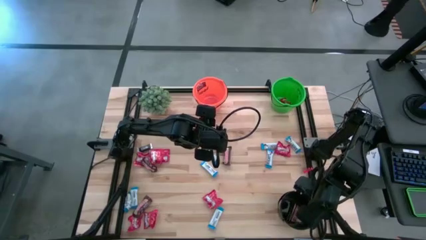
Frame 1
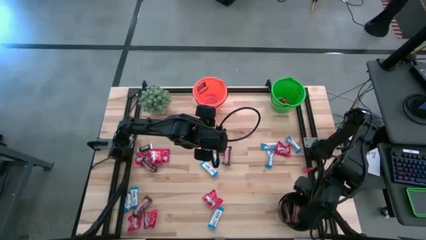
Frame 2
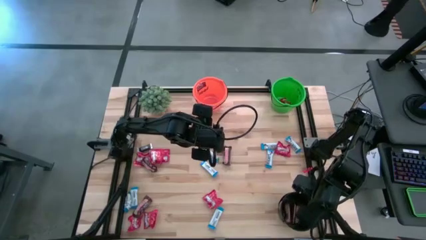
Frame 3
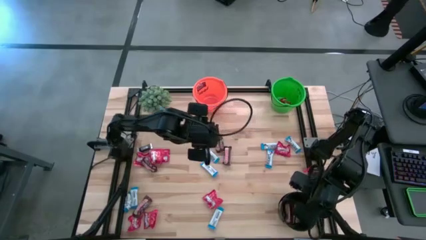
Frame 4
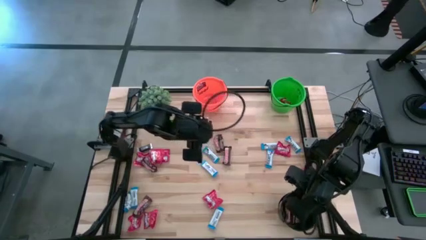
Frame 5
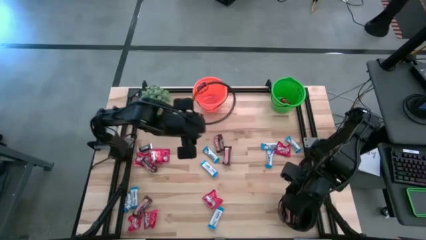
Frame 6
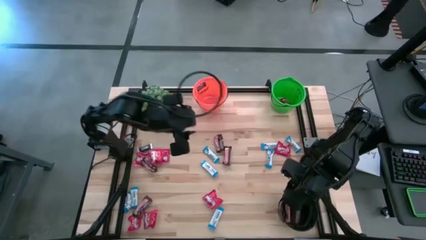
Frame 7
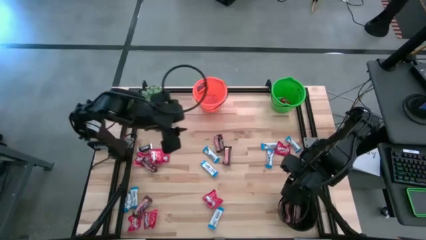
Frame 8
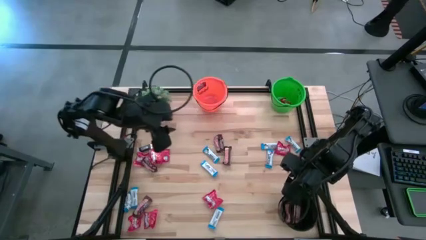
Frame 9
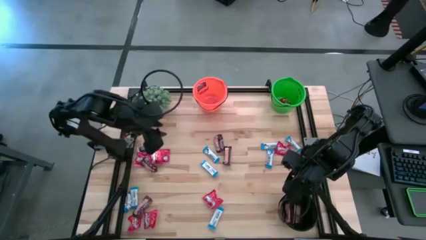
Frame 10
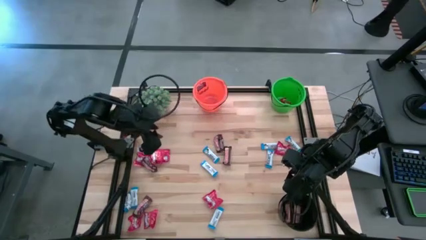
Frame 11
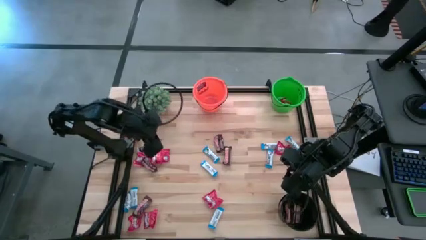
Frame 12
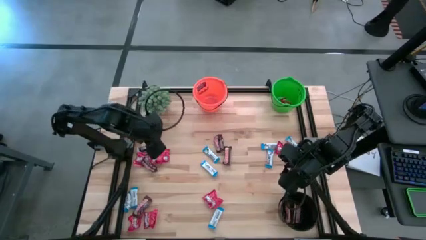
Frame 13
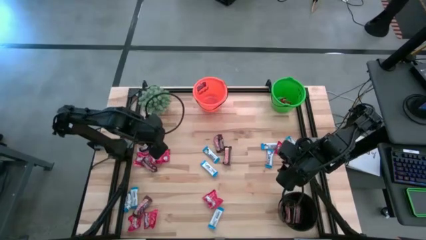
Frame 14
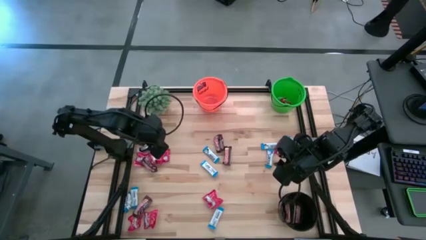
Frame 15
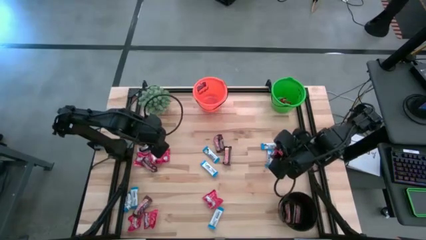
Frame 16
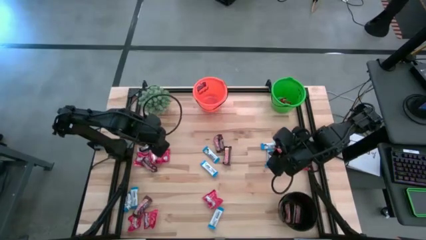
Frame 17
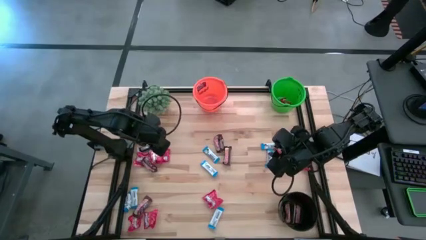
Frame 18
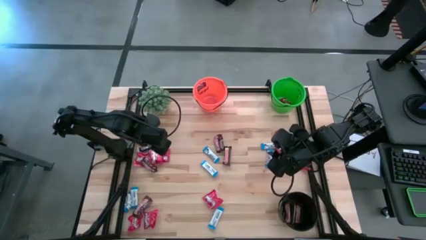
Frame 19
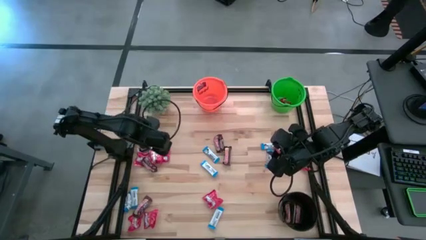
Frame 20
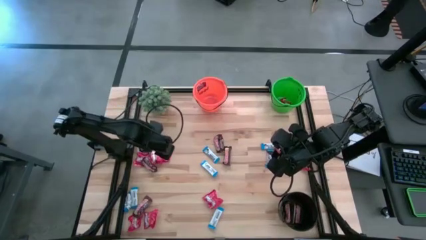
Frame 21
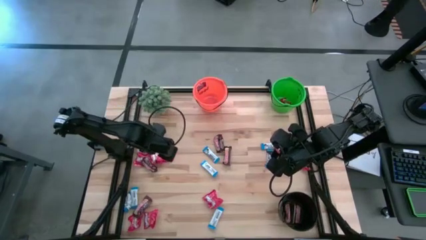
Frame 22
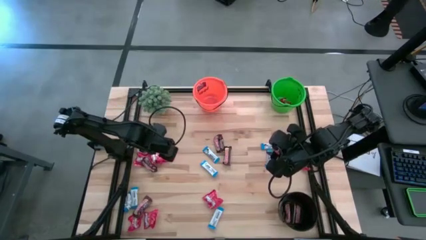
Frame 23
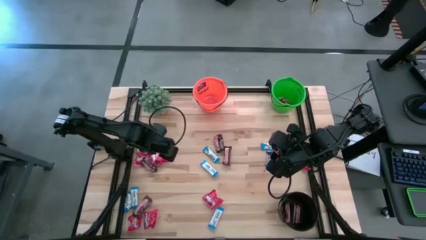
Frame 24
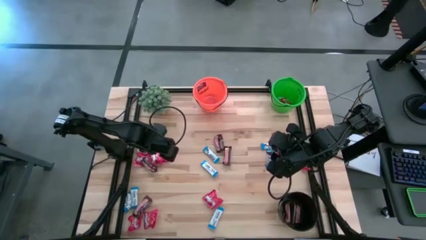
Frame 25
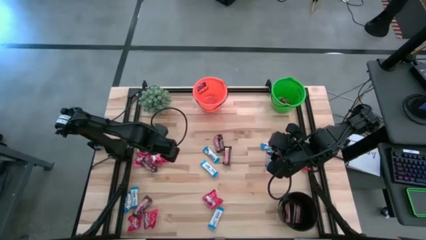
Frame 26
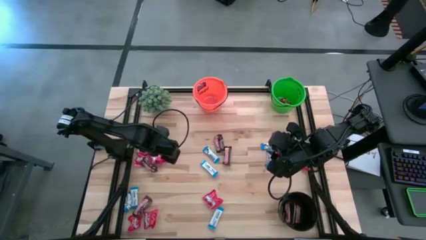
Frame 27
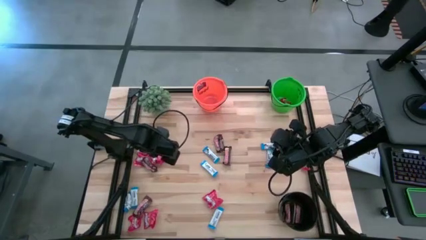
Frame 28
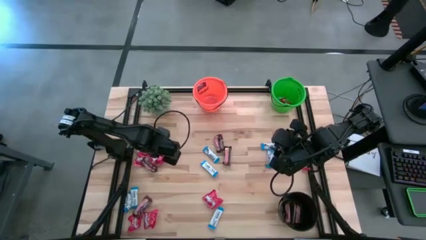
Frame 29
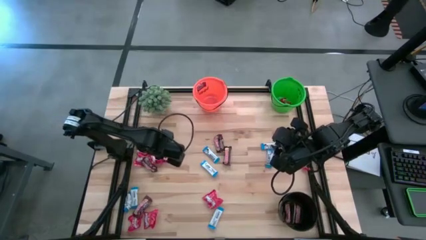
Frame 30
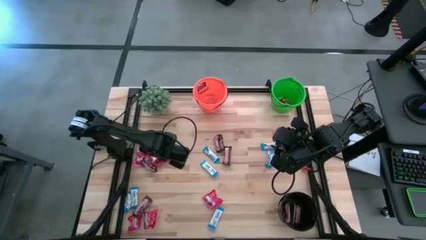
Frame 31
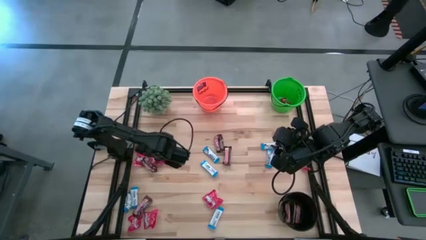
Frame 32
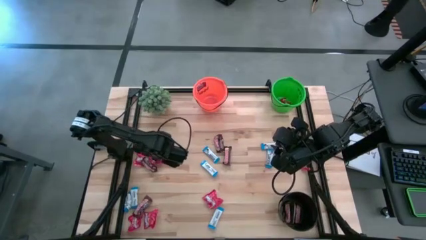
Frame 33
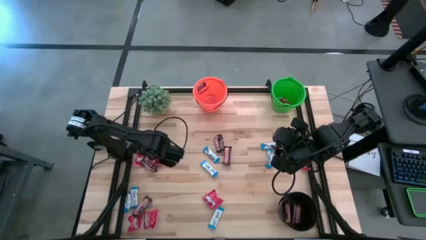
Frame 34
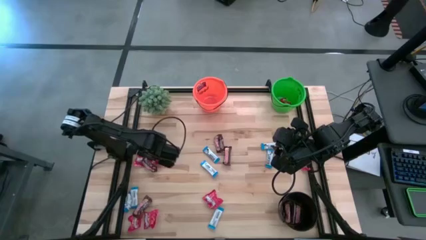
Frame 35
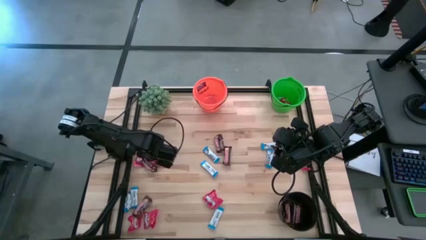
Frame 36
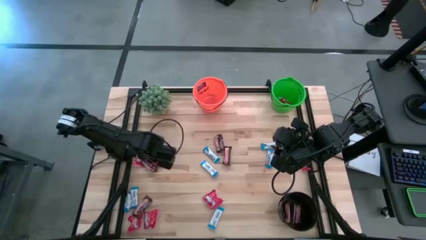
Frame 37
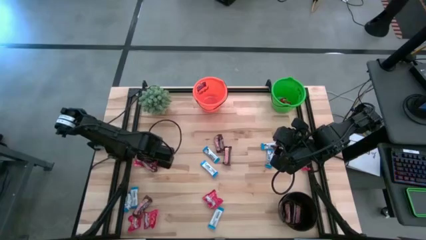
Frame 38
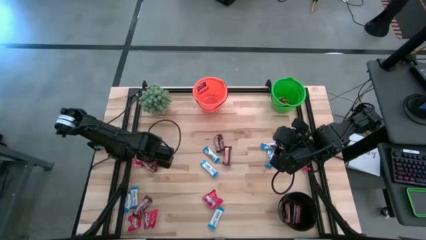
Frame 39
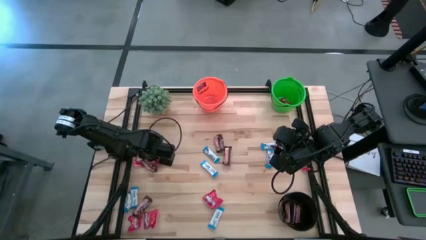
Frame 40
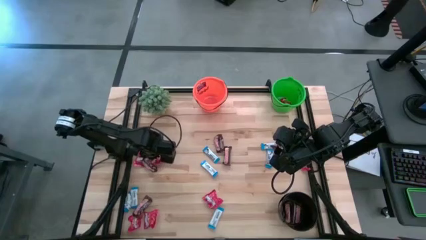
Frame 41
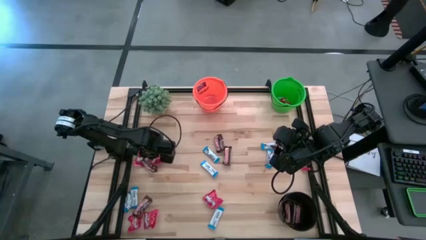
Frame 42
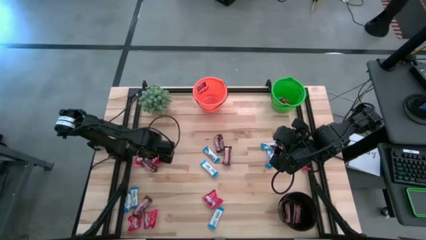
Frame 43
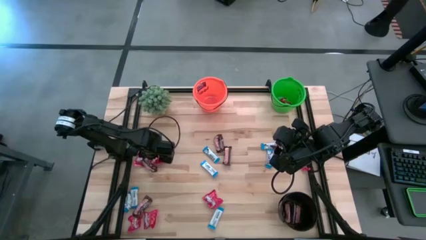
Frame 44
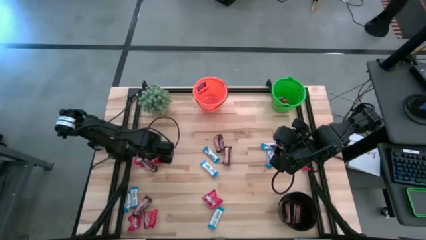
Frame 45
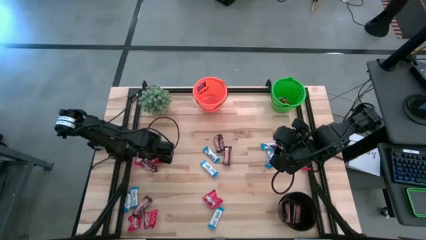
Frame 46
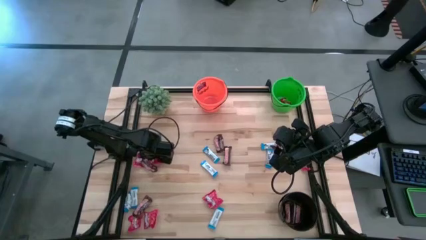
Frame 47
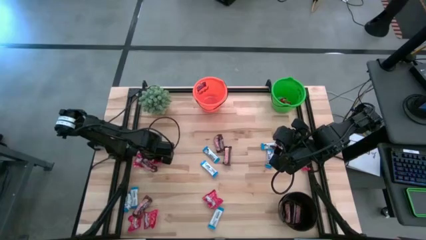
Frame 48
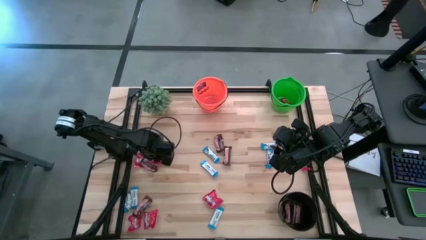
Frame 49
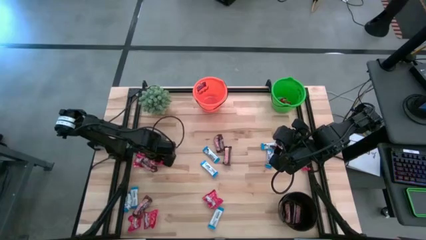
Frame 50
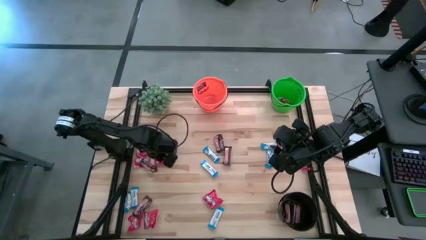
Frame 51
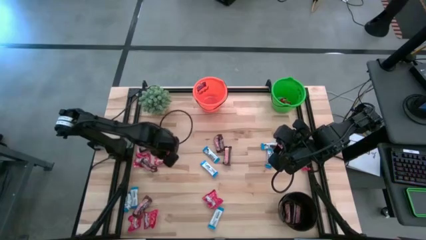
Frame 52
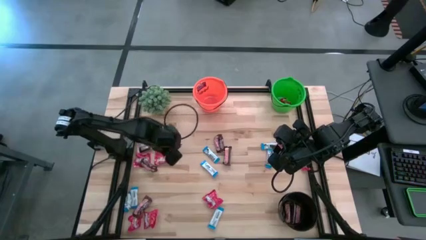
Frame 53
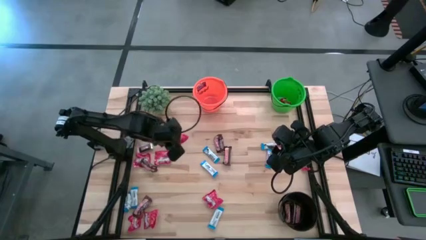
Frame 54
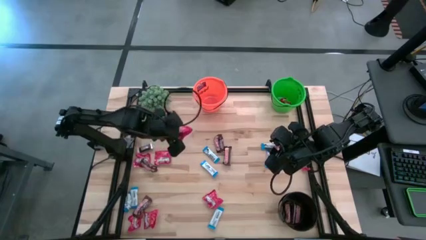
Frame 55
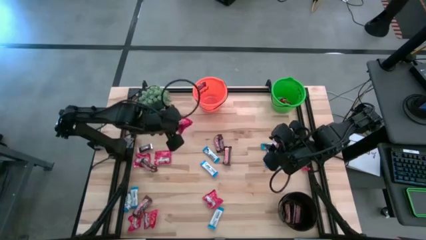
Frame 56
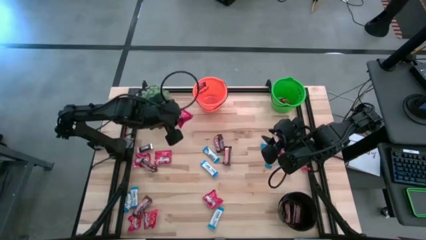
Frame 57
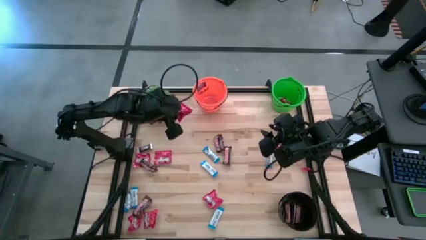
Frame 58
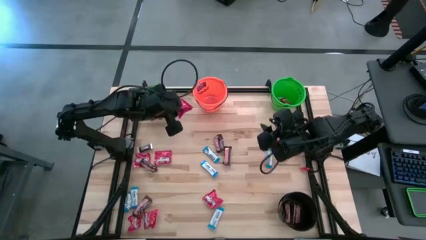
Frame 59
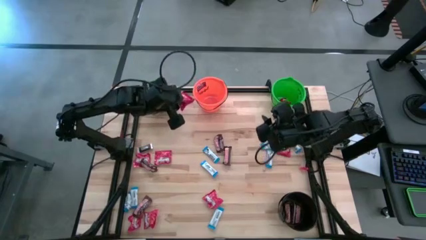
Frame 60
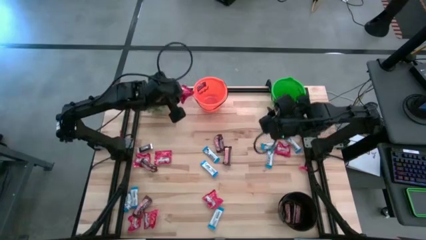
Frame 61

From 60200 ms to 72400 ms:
Task: Organize candy in baskets
Put the red candy into the green bucket
